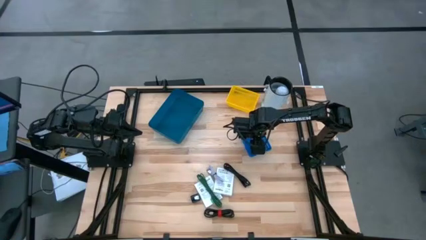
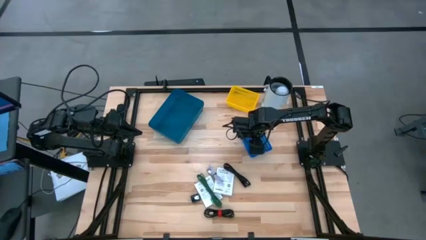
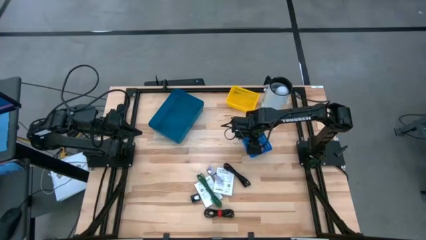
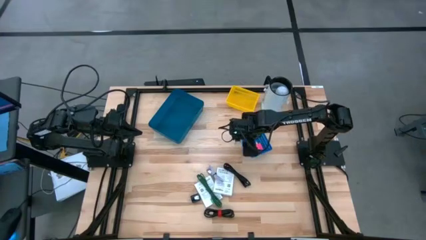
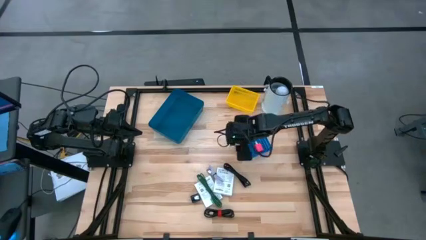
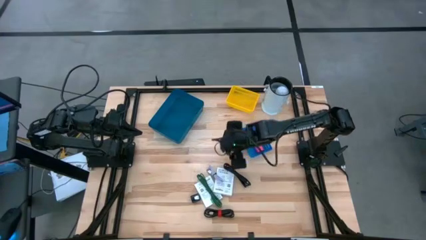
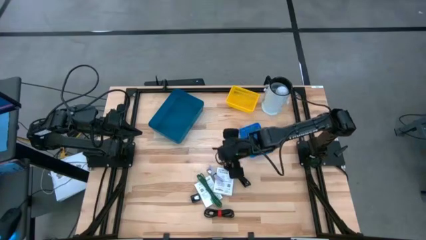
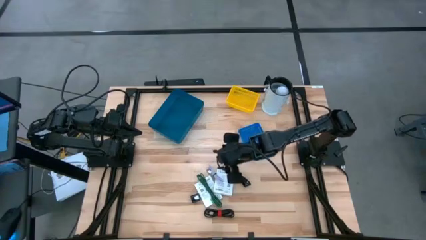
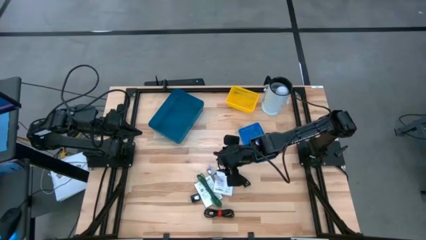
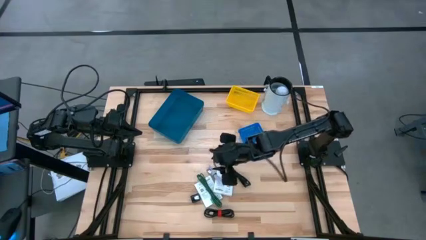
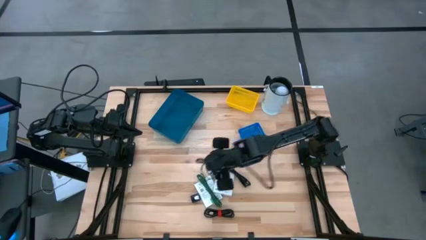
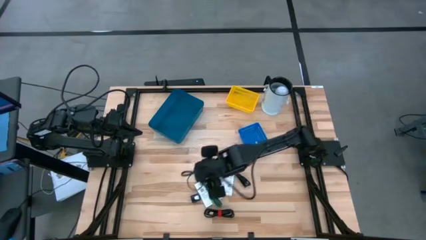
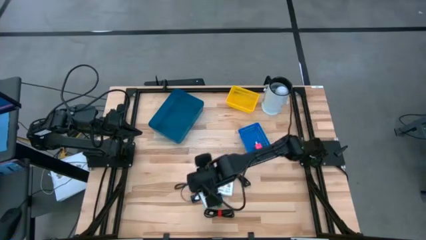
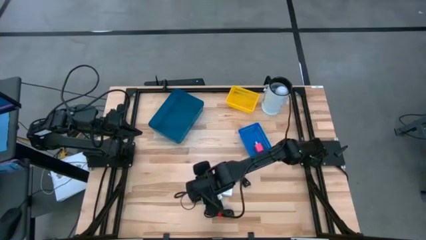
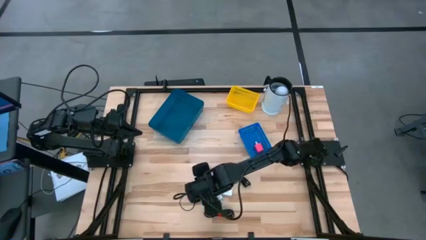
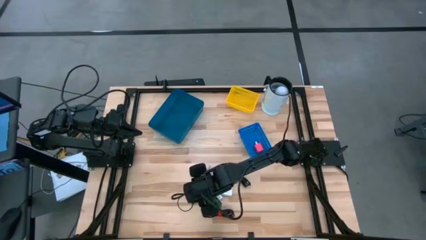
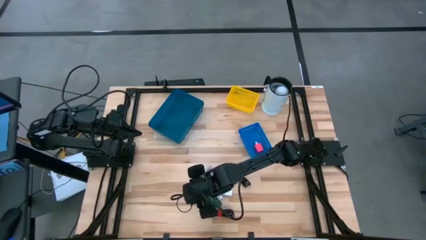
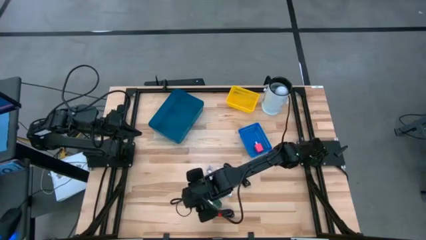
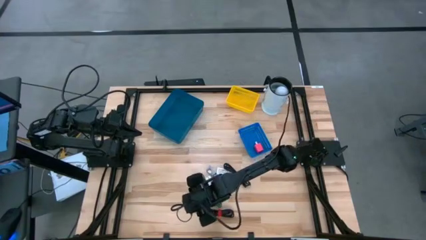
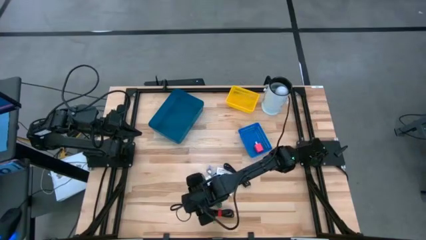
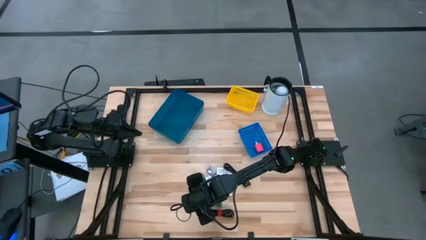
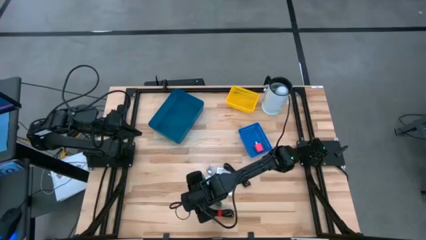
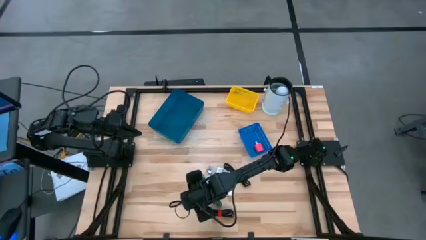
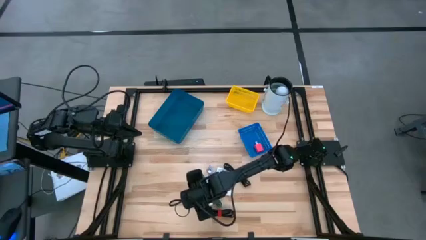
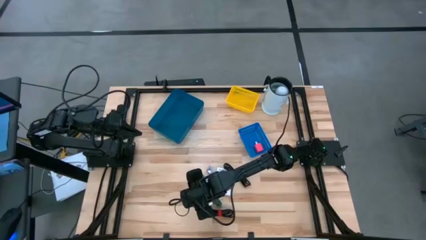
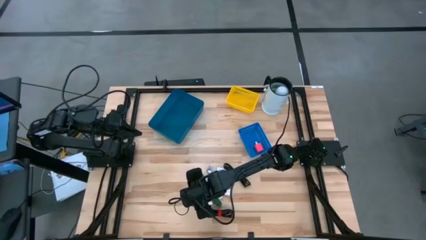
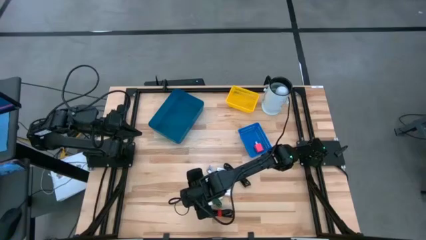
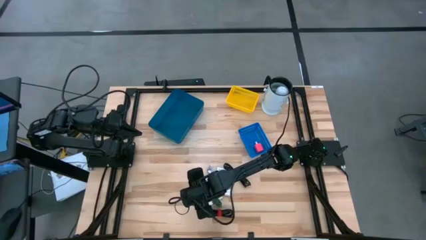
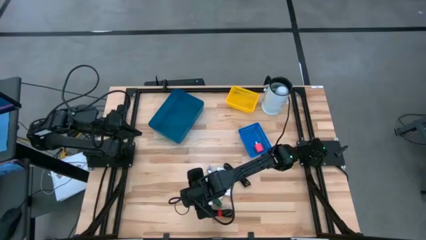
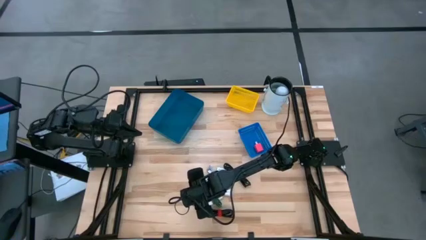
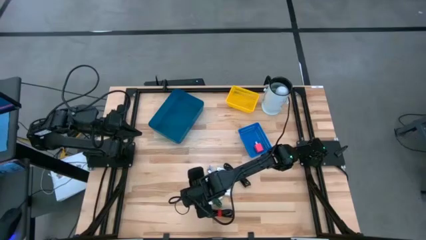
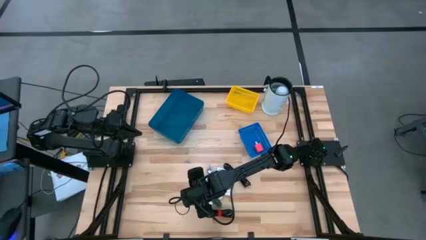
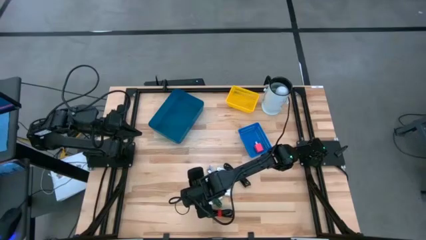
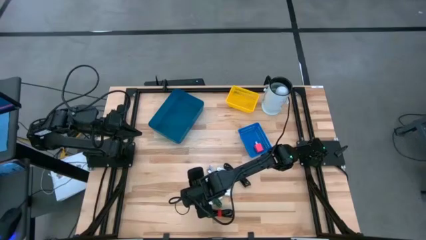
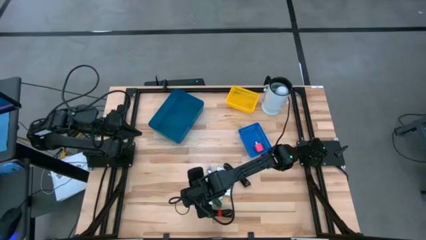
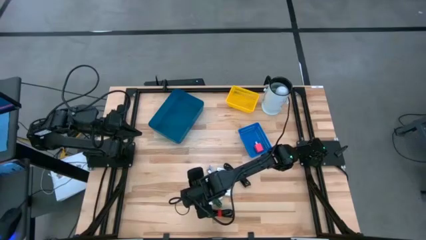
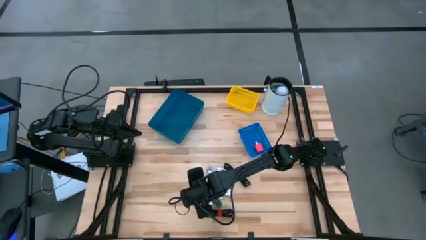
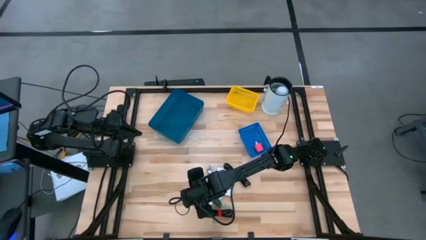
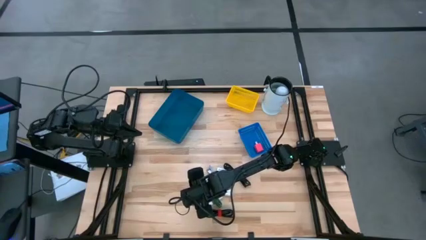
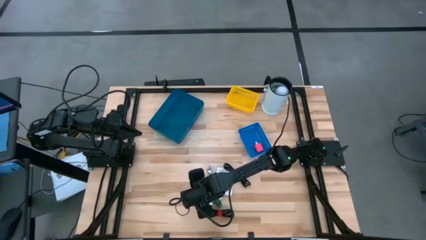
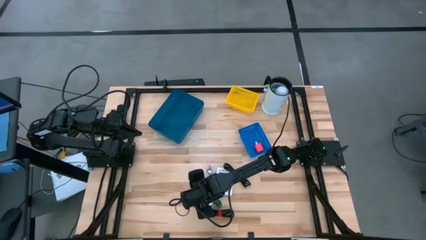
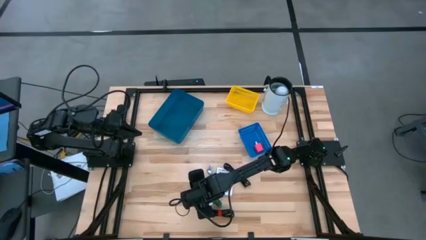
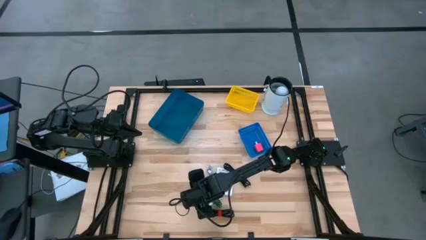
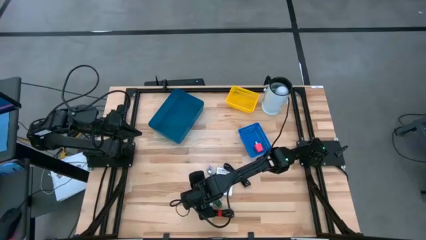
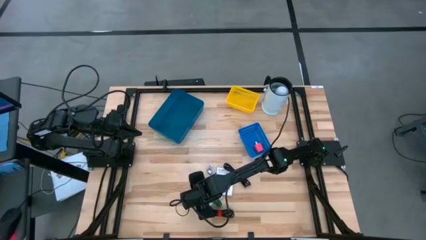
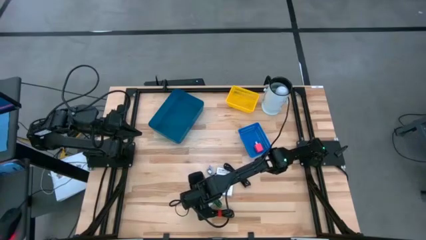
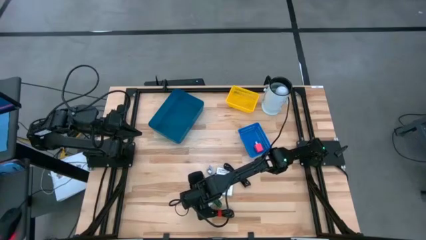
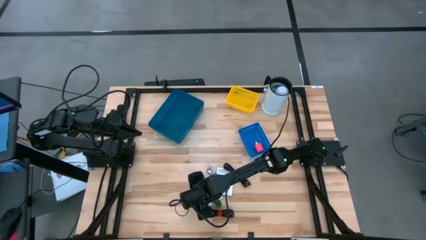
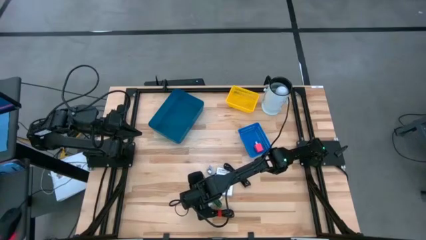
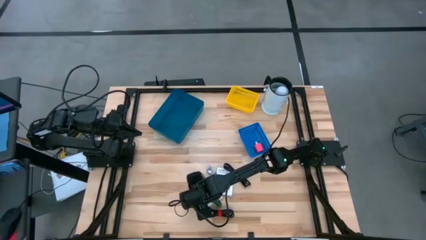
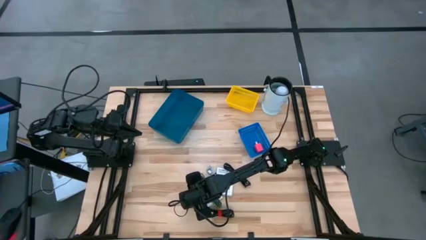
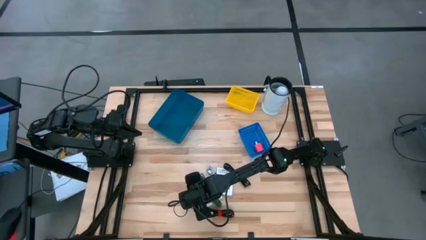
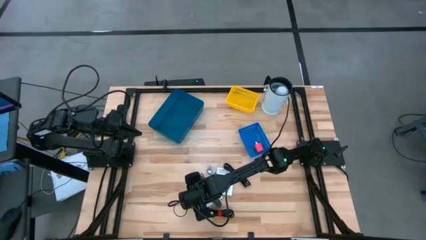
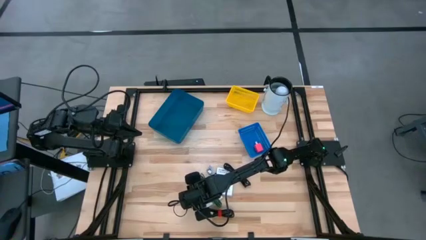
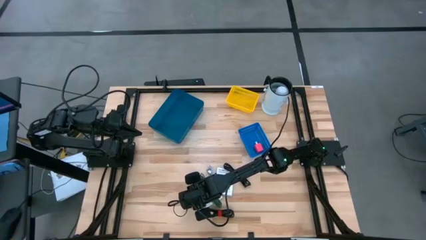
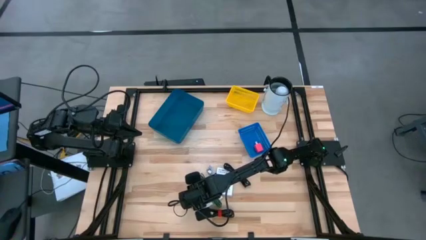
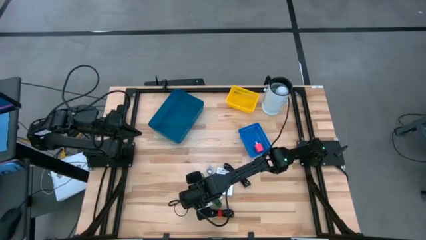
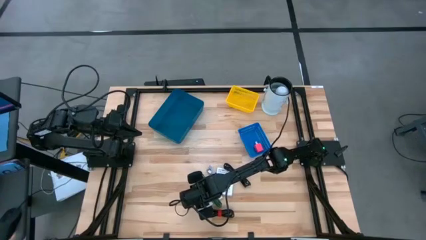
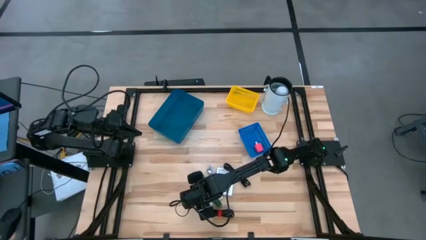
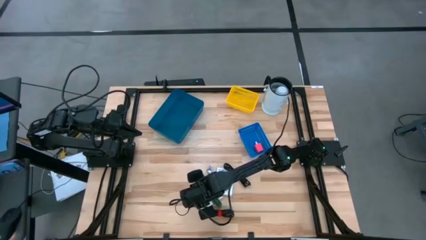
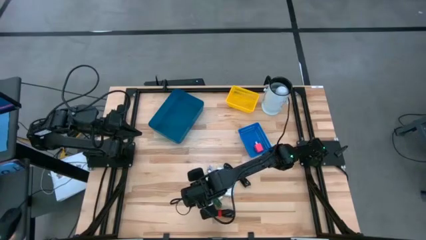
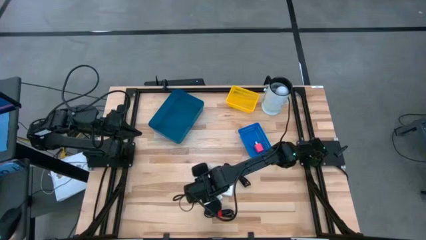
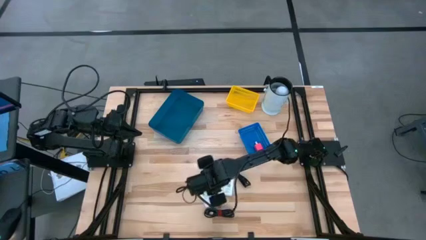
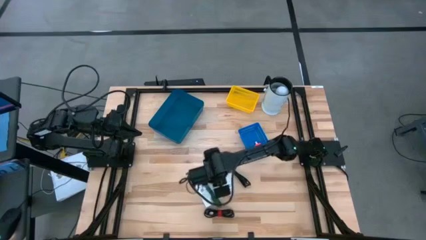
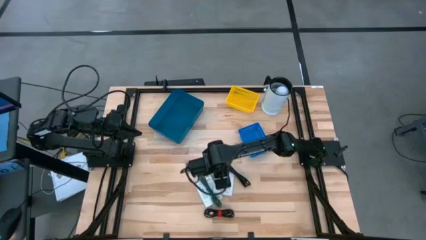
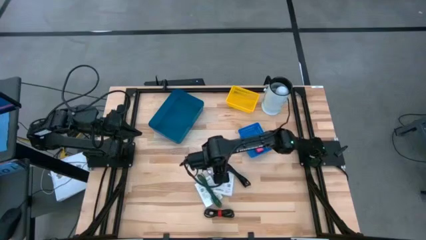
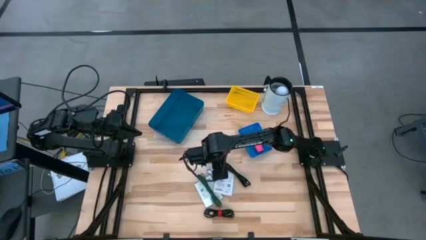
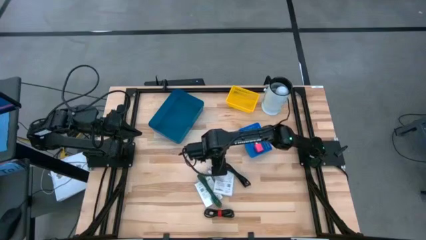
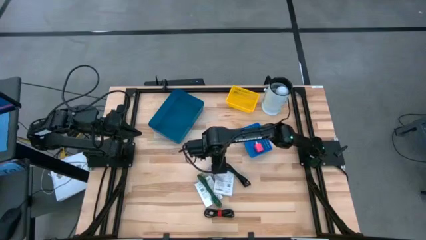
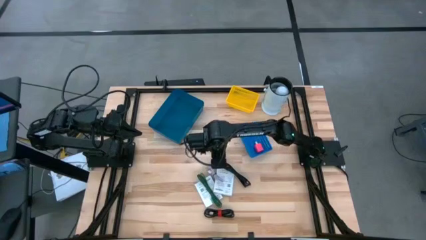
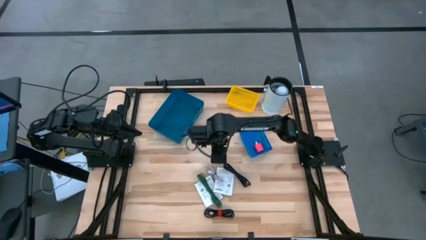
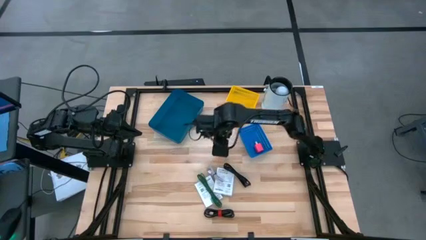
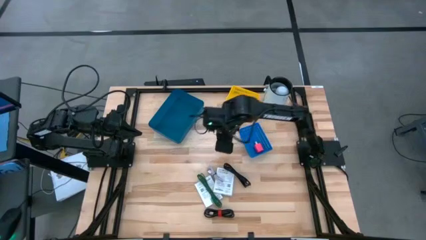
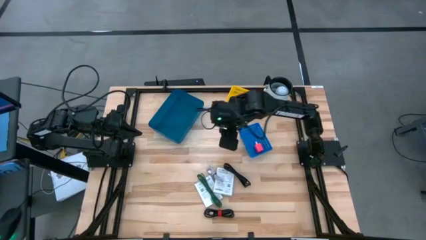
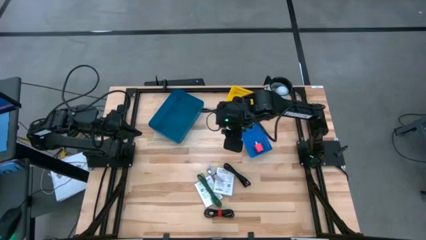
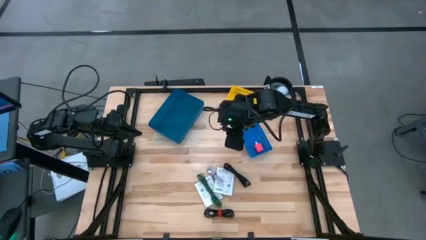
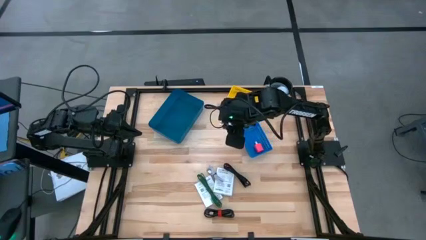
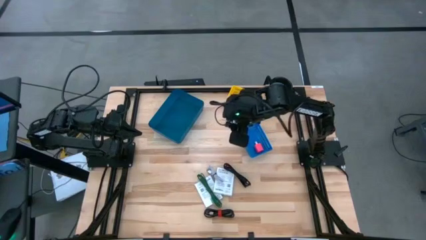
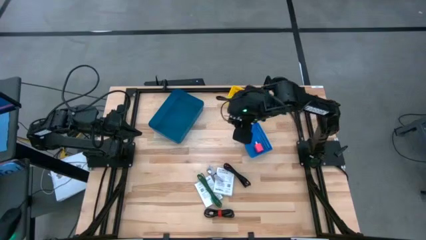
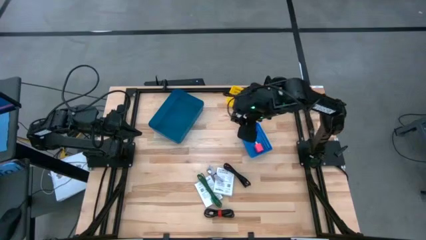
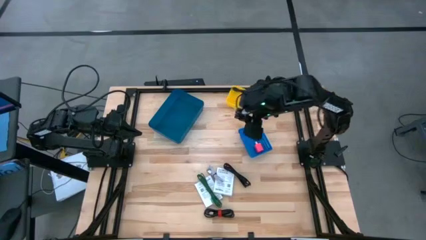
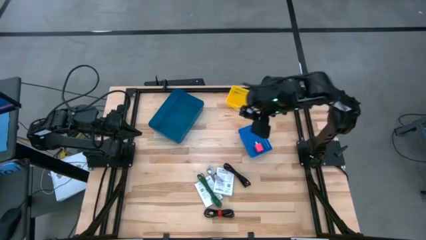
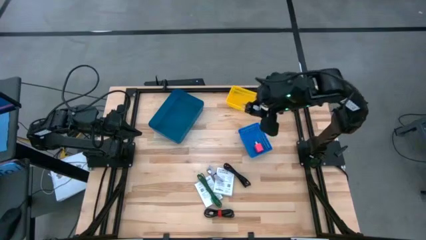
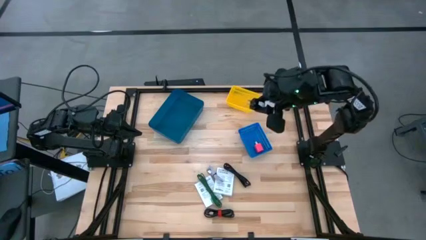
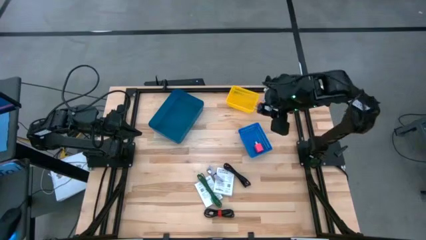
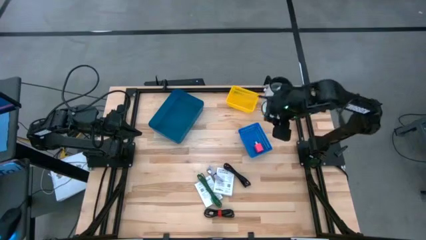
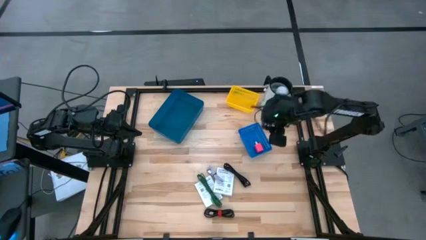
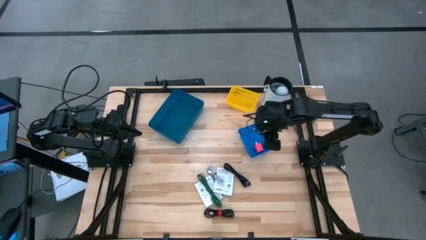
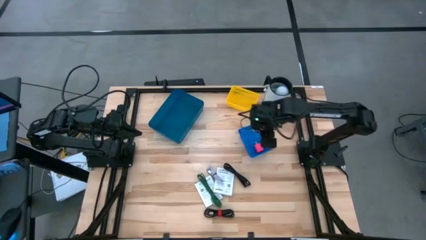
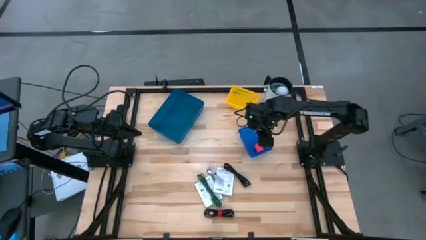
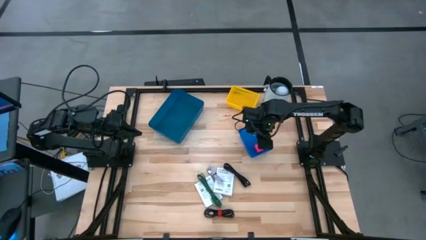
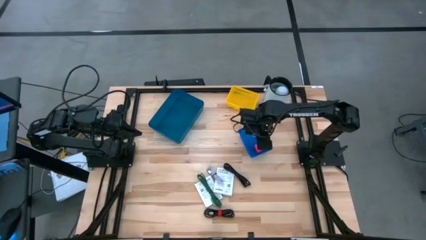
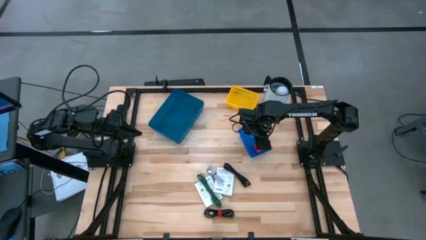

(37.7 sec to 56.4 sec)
Task: Pick and place items into bin
Put the black charger adapter into the blue bin
